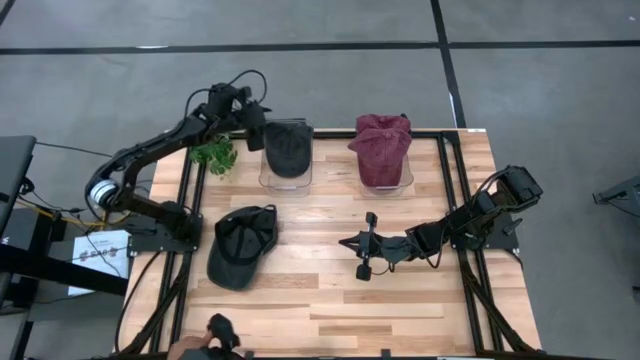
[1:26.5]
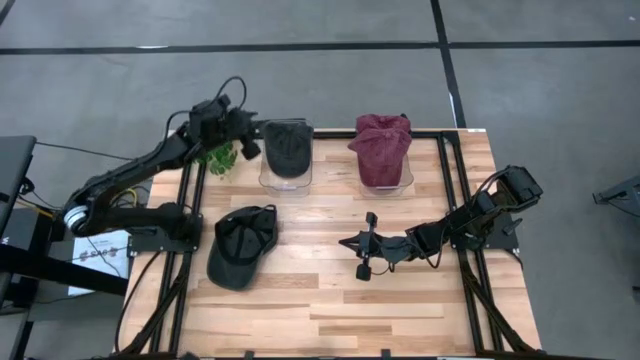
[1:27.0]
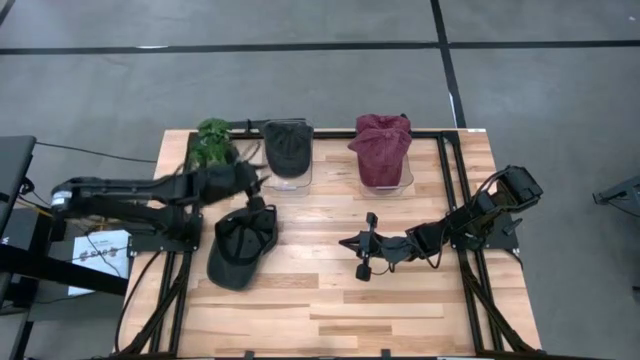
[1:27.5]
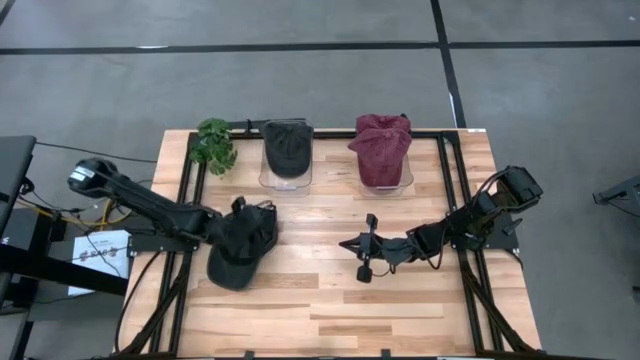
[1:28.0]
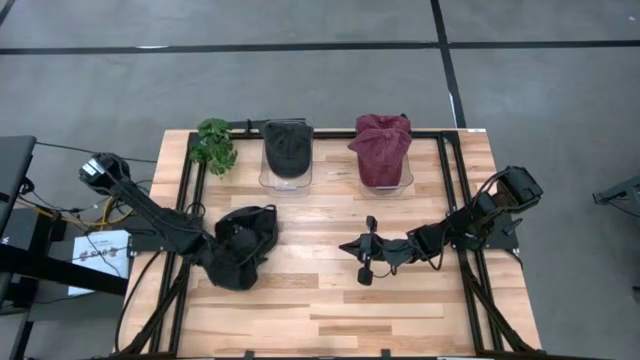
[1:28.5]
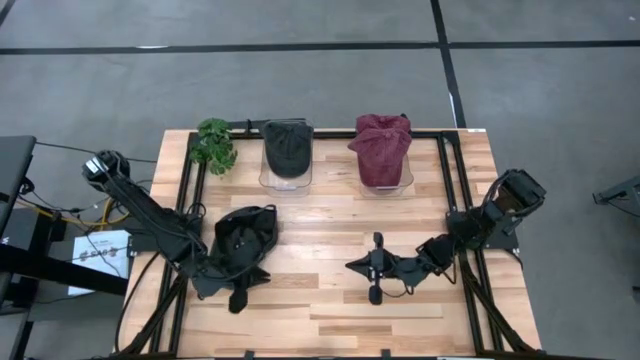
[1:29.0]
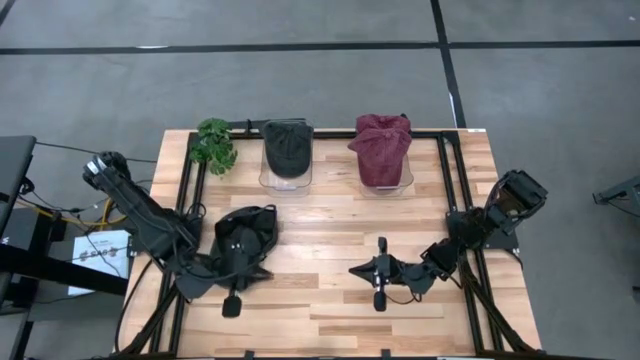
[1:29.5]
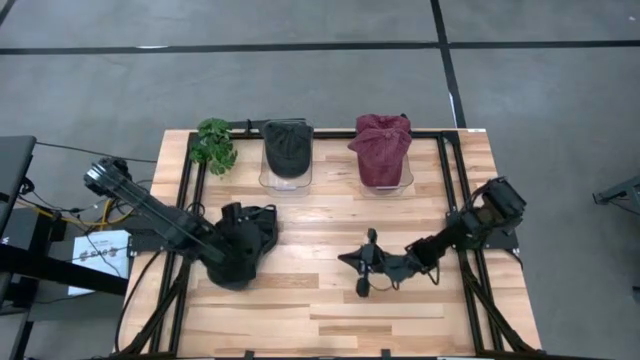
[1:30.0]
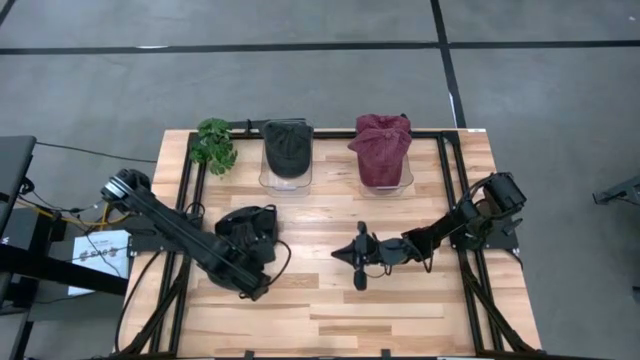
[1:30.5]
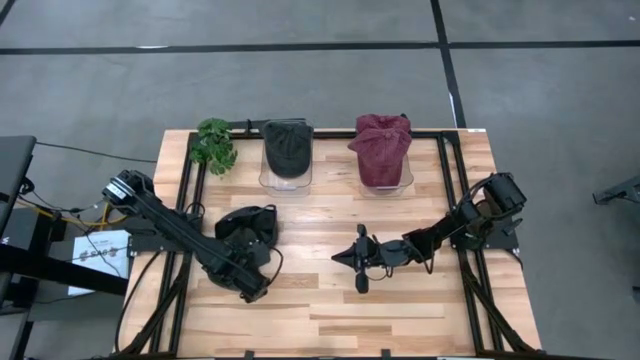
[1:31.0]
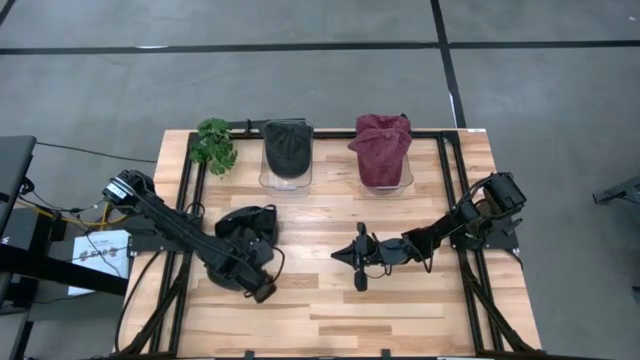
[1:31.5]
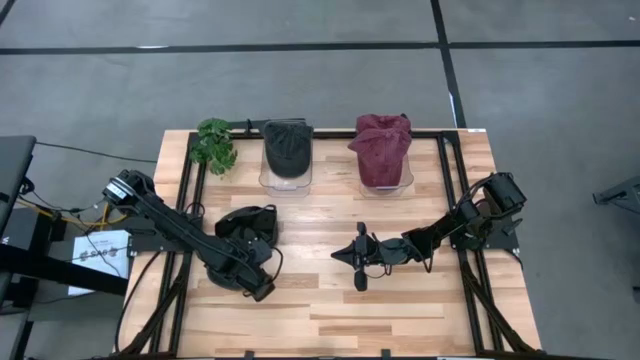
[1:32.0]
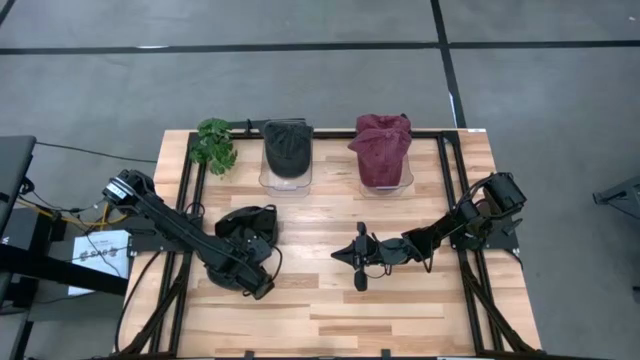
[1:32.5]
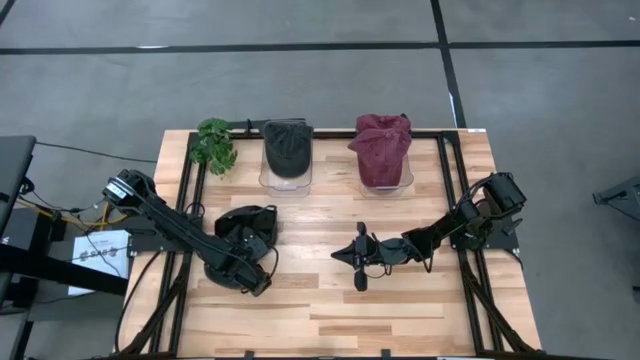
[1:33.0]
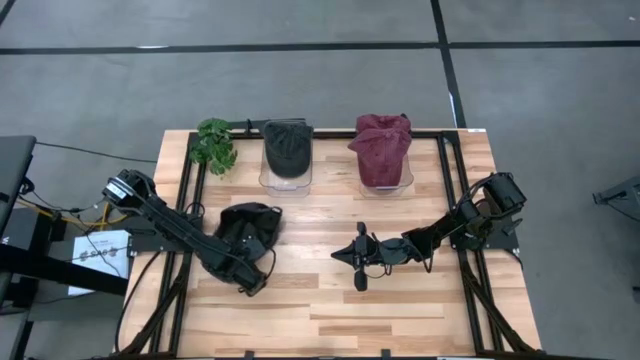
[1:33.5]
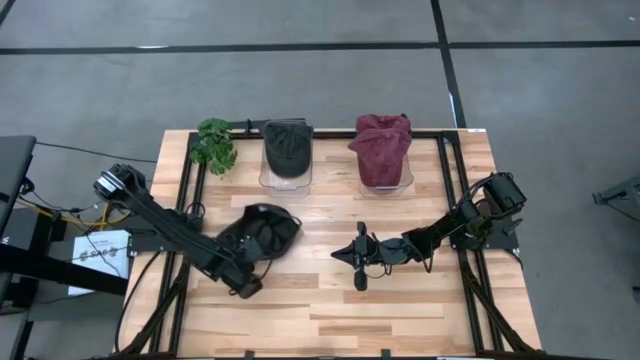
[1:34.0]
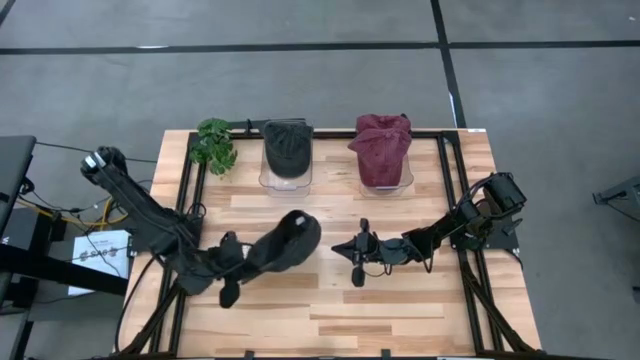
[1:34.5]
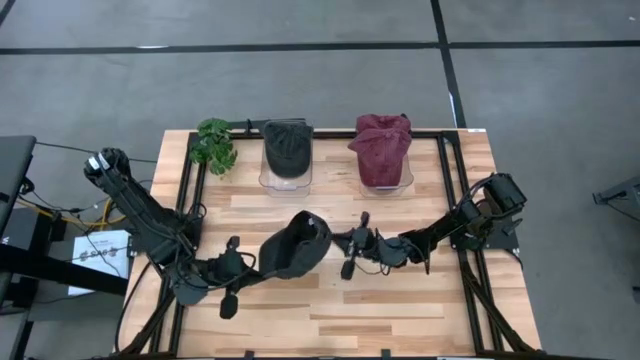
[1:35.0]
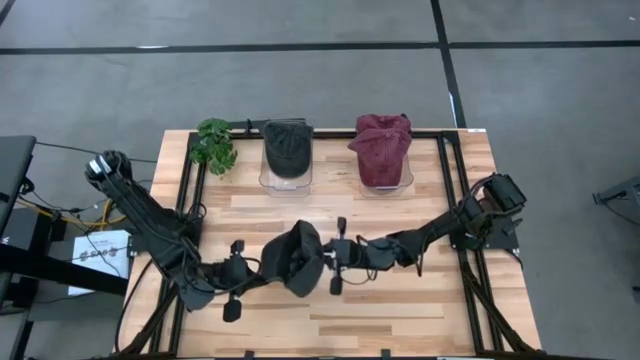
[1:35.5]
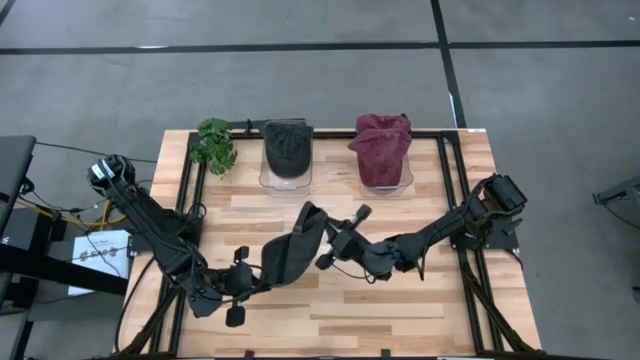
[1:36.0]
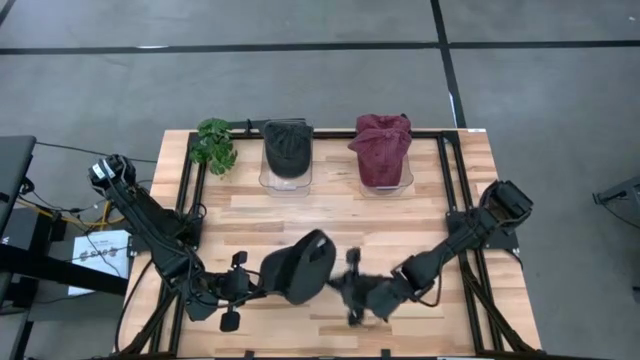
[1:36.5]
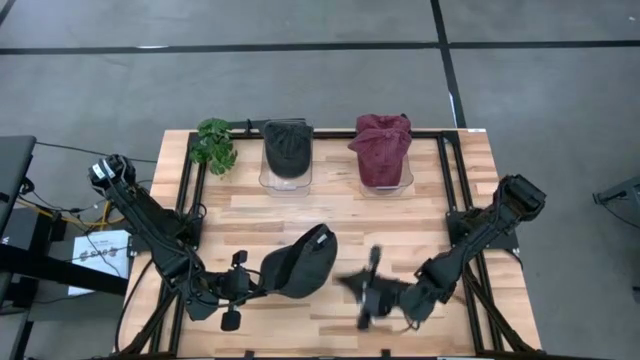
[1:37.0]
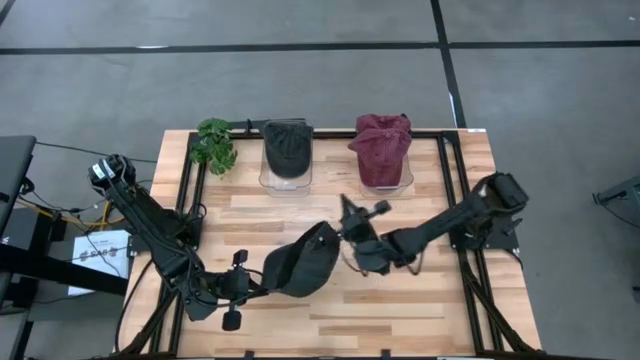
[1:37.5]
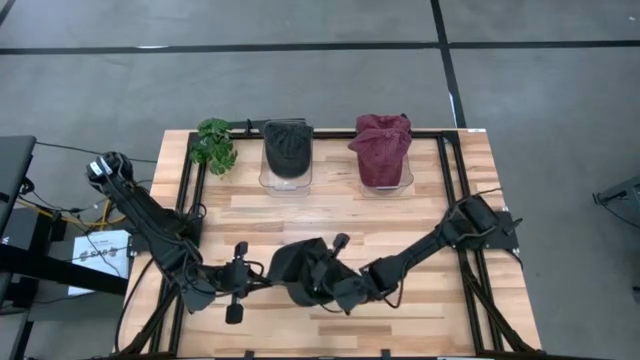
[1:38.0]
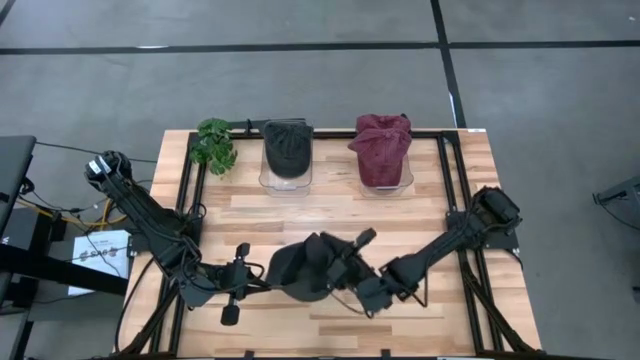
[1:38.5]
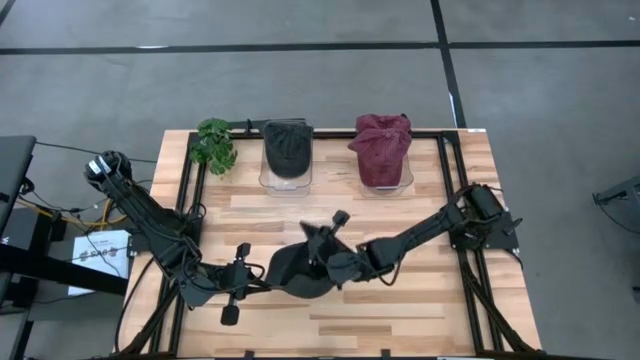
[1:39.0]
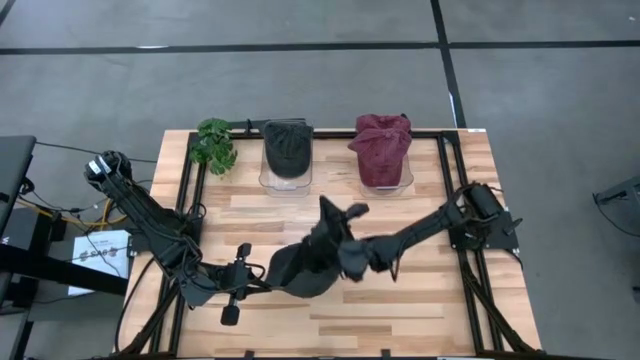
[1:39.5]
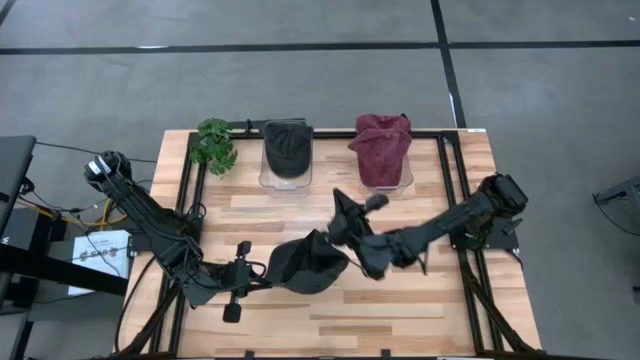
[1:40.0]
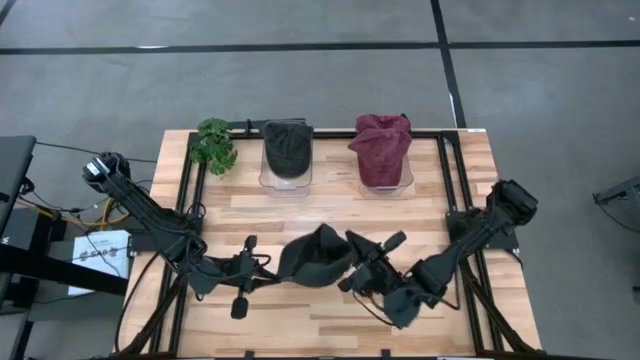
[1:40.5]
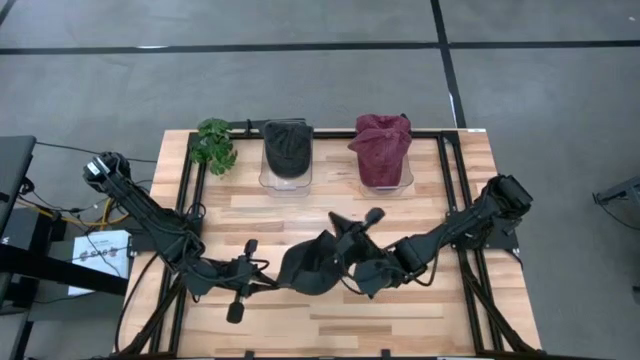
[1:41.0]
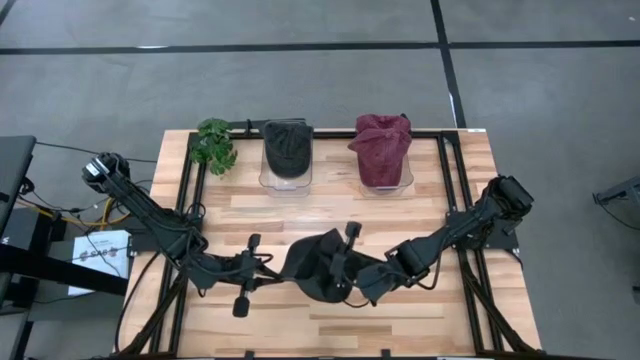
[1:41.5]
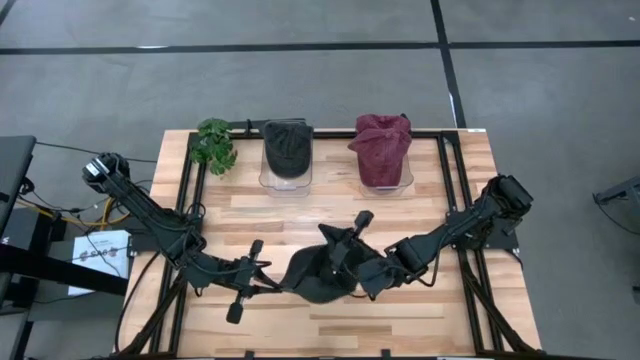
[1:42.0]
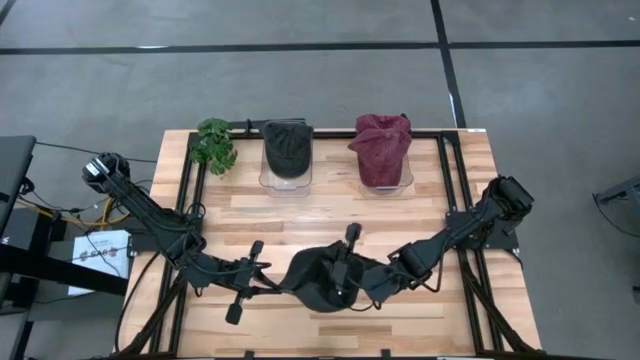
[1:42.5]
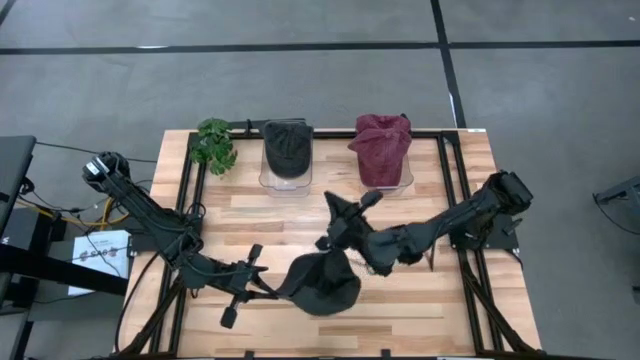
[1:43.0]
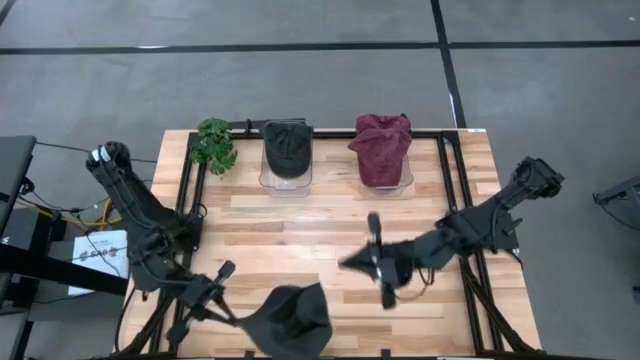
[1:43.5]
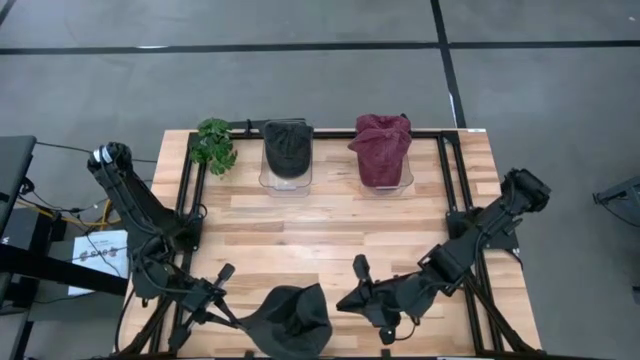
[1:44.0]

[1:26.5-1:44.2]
Task: Pick & Place hat
Put the black cap into the left transparent bin

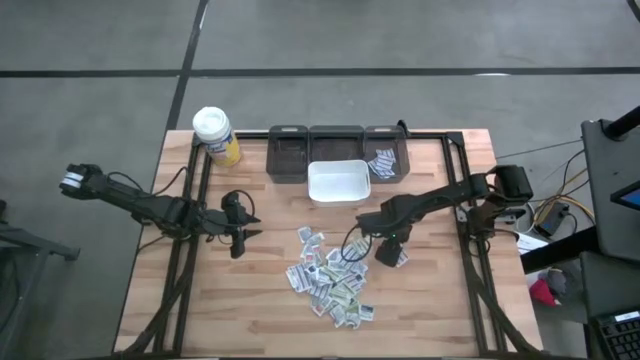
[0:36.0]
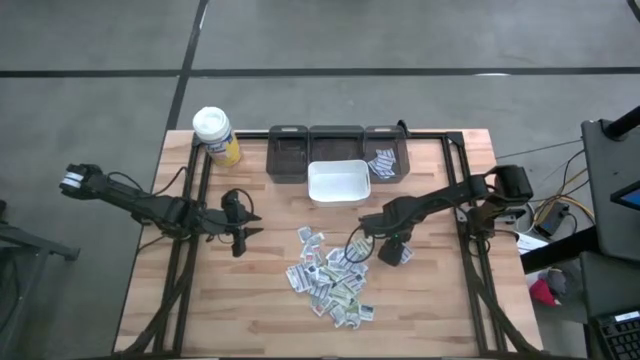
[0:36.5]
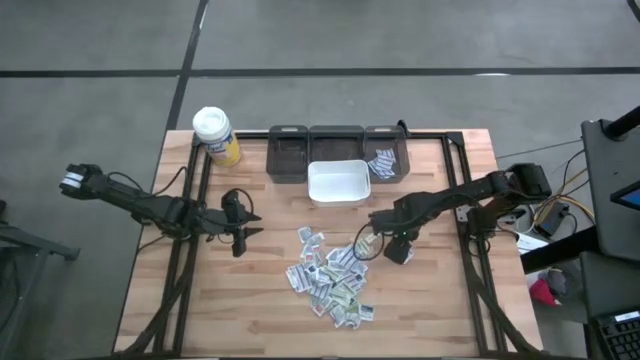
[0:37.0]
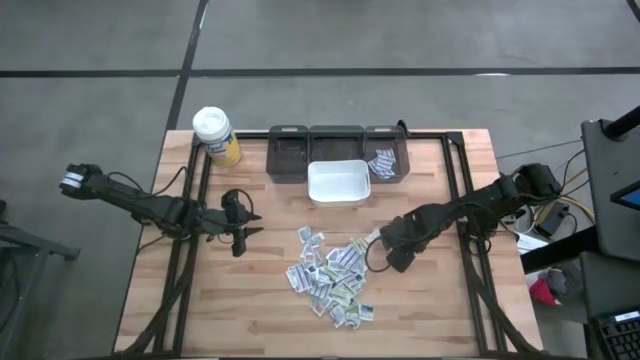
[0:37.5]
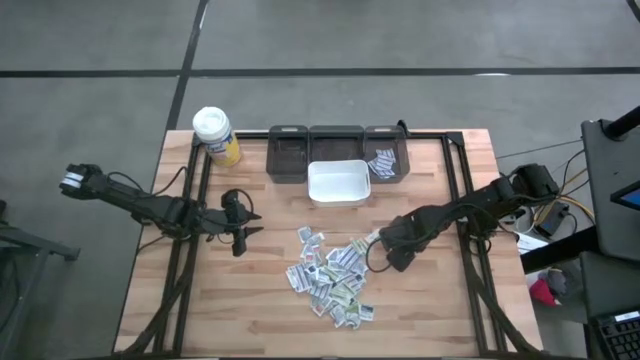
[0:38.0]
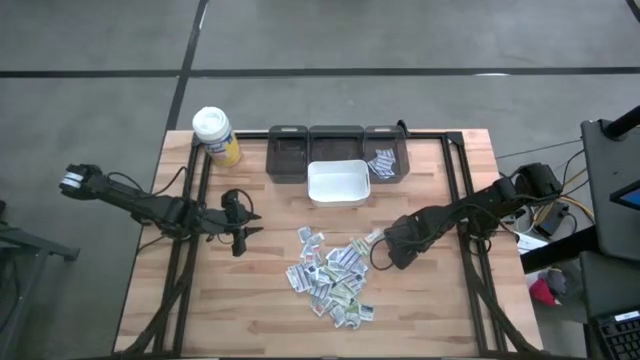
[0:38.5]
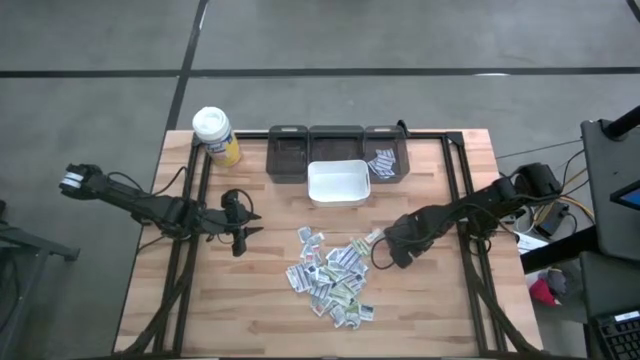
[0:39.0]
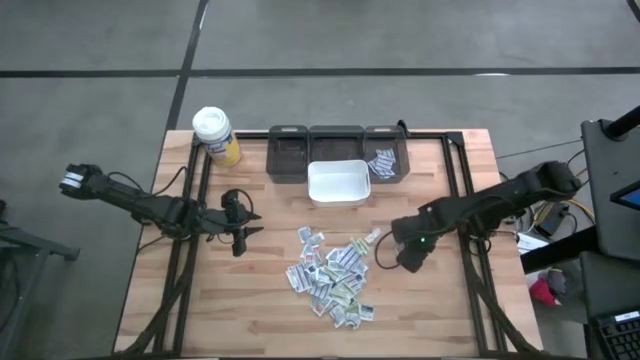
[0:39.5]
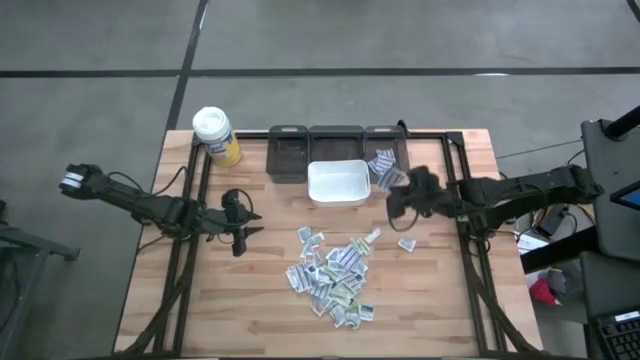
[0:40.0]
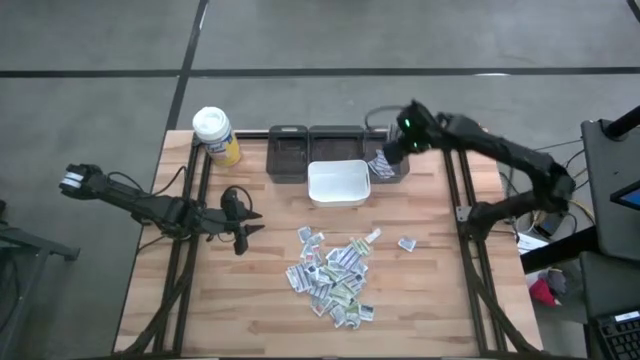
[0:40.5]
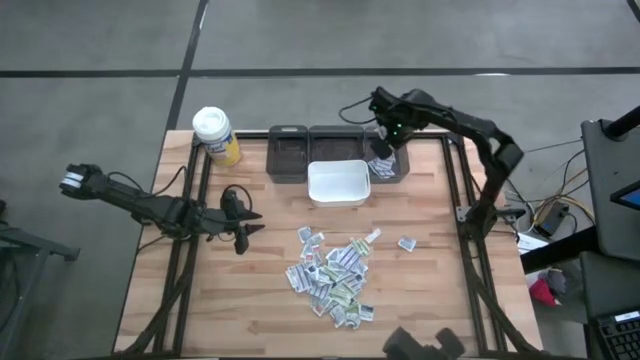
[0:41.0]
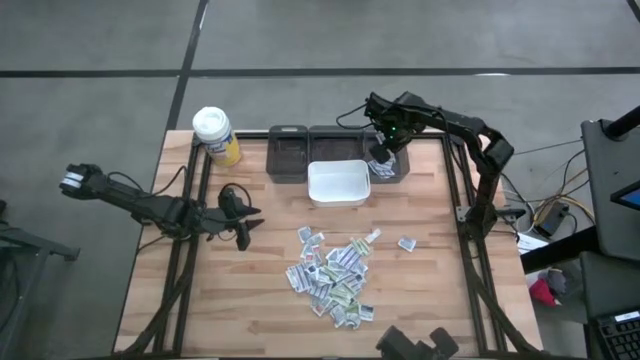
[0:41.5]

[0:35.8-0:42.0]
Task: Pick & Place First Aid Supplies
Put the blue bandage pack into the right black bin
